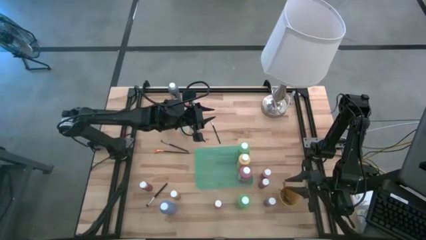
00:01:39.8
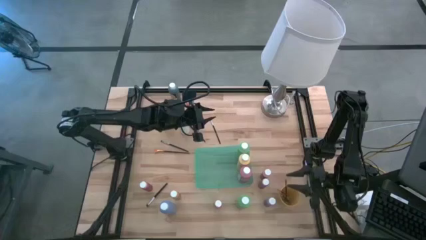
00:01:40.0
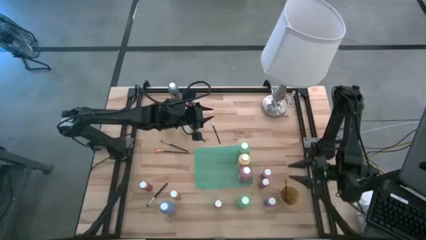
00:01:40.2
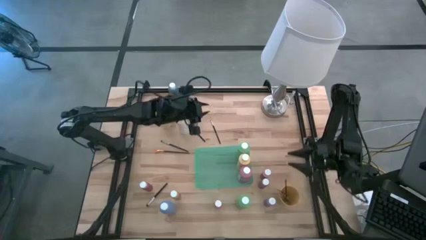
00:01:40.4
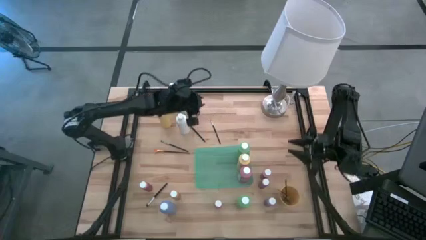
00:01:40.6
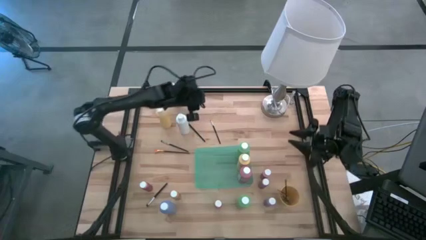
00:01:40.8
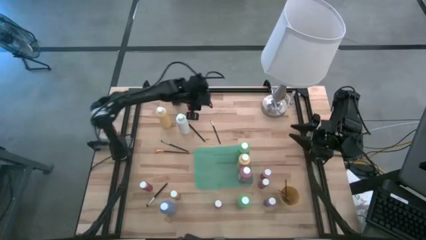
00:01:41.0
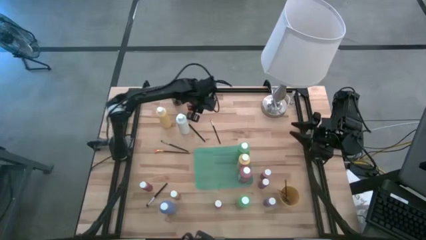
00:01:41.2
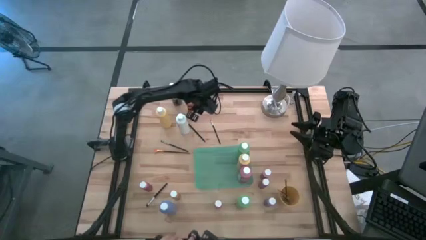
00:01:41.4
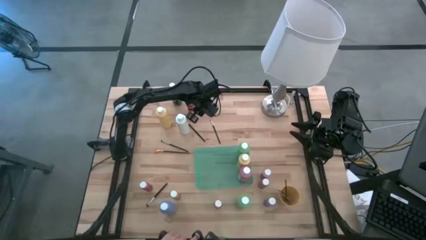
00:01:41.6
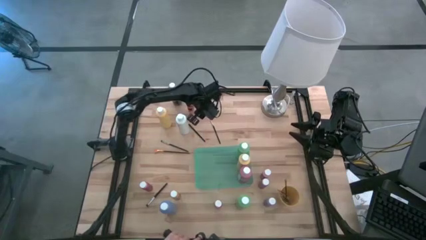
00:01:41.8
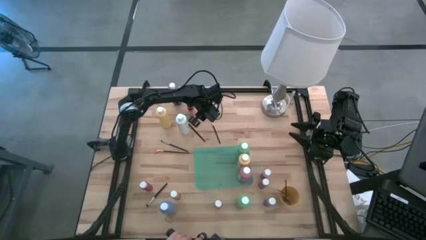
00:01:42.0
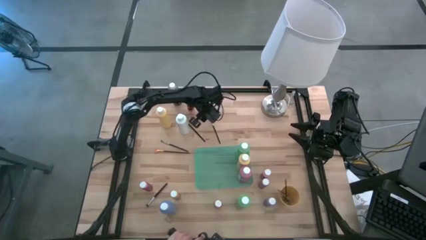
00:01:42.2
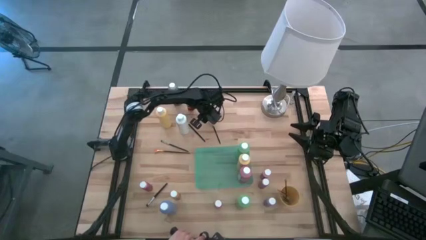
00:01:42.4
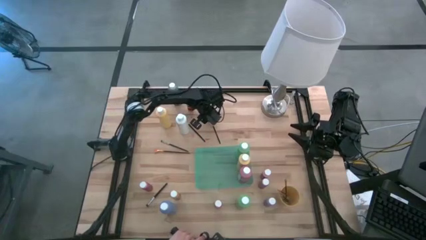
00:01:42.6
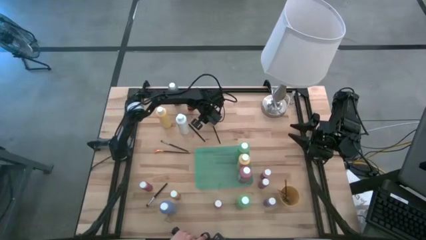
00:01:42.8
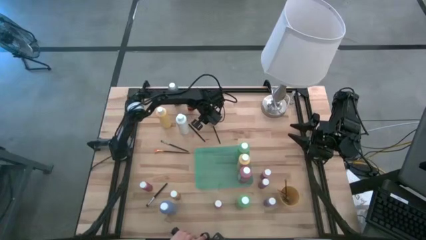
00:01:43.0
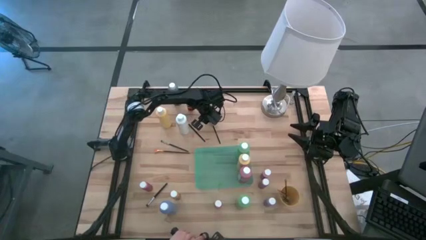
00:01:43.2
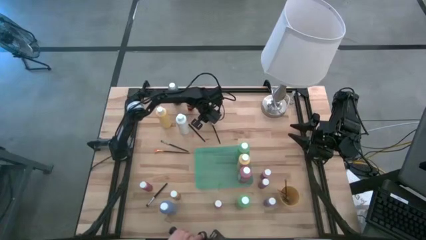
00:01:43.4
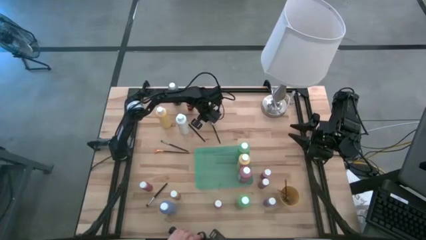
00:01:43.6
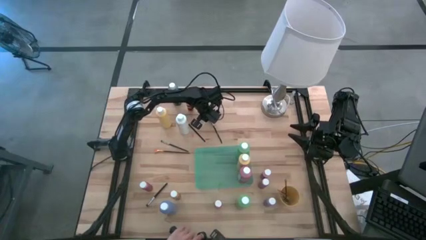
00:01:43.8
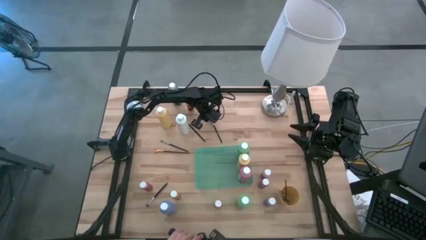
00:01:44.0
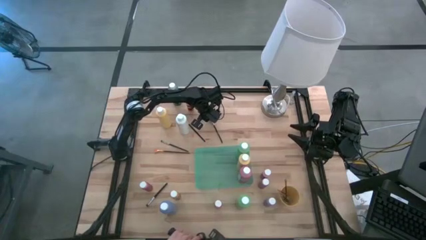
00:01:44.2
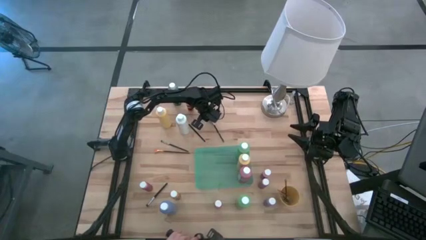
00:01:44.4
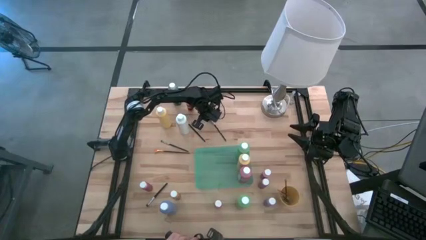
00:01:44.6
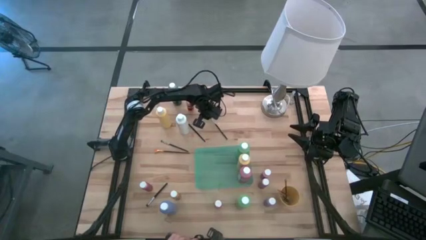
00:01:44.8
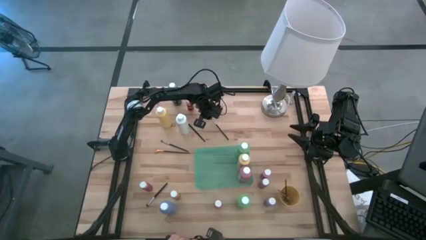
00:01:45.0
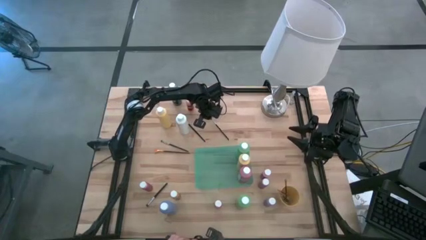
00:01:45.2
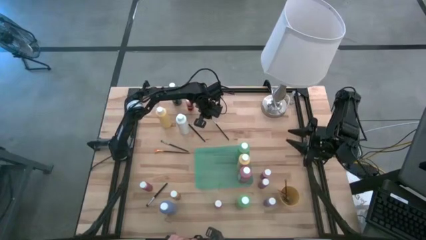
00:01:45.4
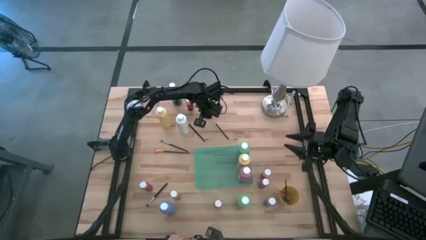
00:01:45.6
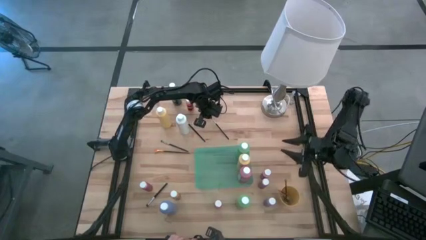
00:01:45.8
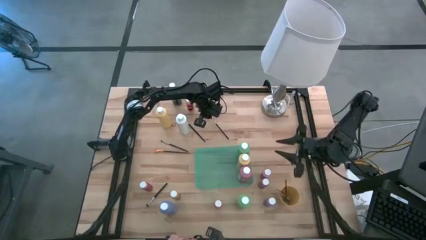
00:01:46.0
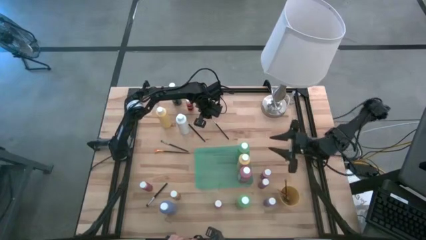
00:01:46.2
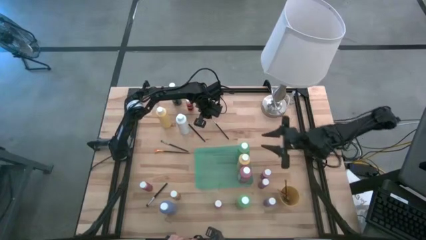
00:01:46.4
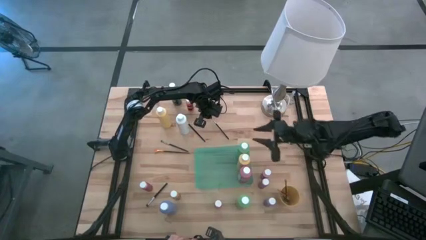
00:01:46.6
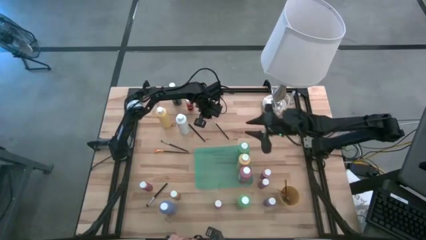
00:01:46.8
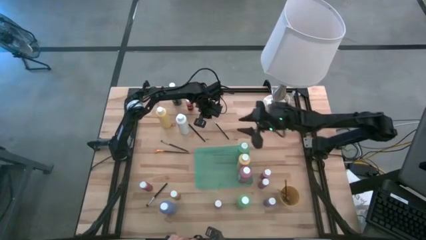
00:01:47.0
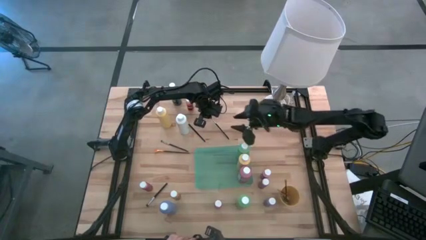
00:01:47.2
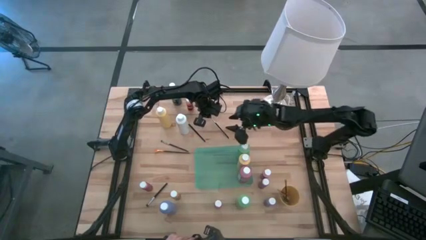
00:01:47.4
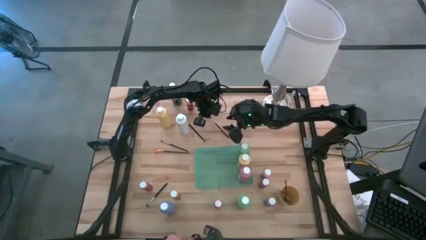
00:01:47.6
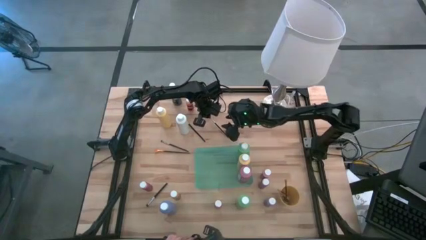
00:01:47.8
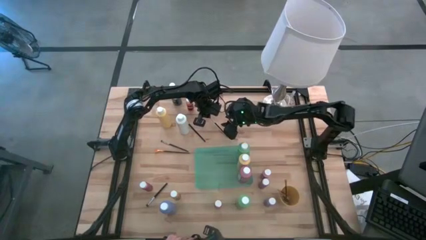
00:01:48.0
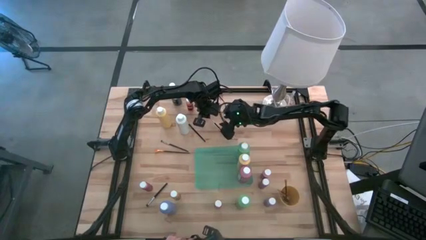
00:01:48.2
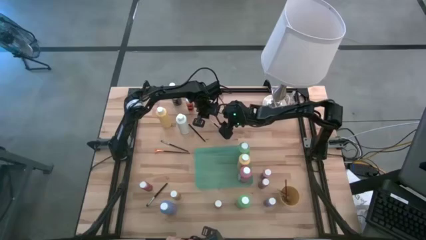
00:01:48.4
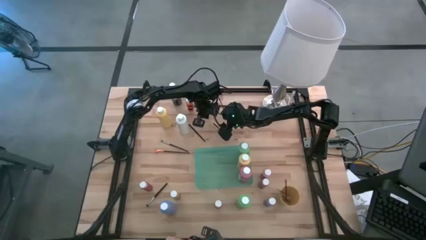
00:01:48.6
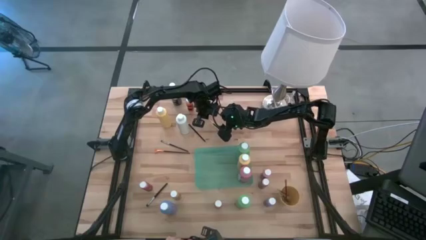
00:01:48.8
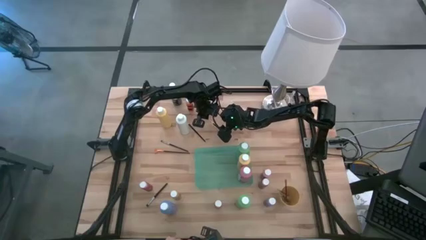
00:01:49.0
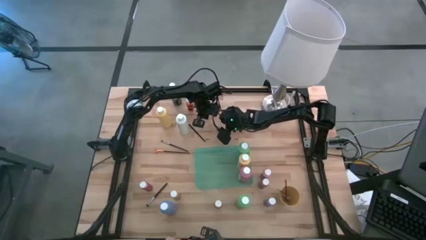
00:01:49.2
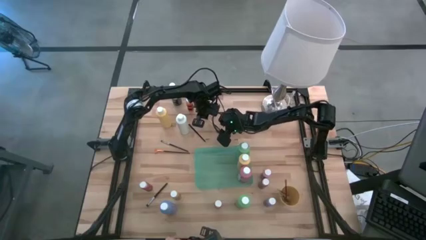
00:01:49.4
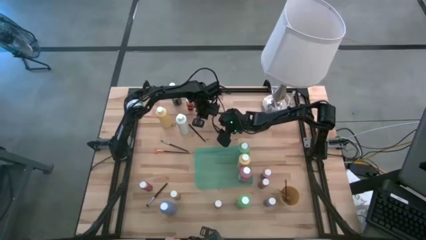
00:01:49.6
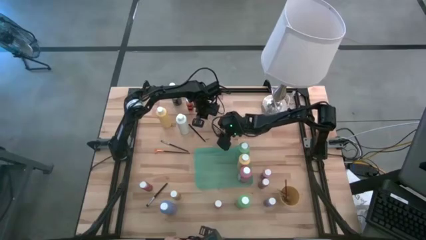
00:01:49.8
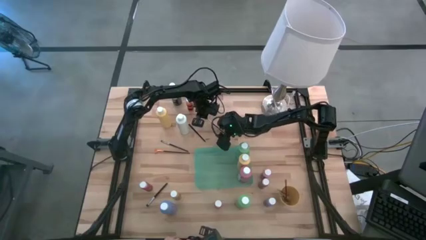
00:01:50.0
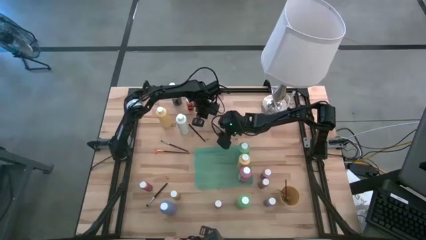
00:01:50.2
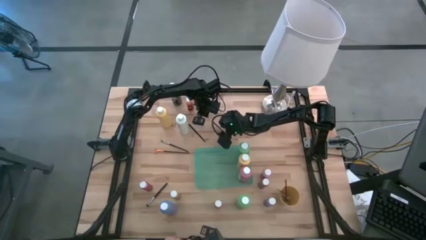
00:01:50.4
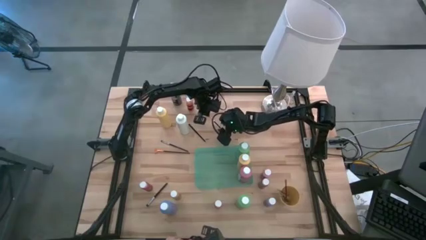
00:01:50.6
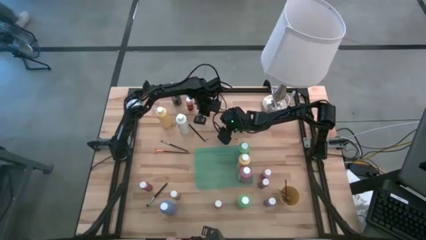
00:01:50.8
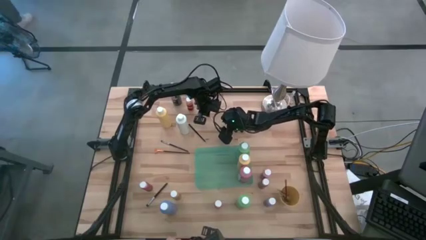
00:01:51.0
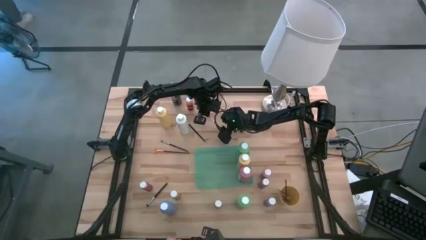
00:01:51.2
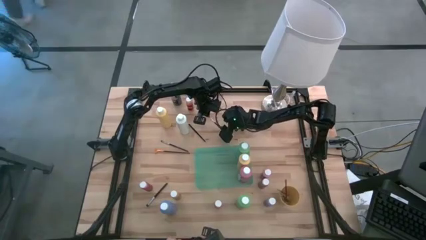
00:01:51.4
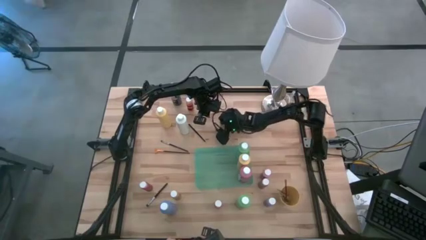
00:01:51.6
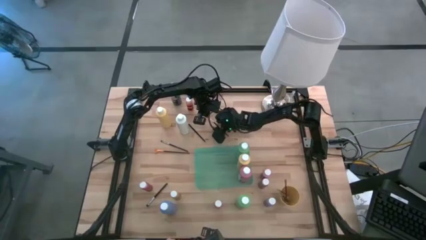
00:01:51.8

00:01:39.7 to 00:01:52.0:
Task: Pick & Place Paint Supplies
Put the silver paintbrush into the yellow cup
